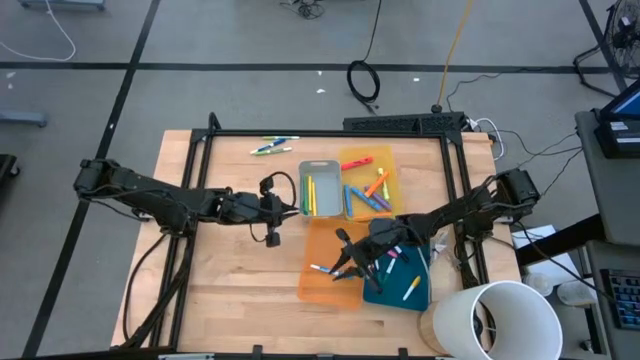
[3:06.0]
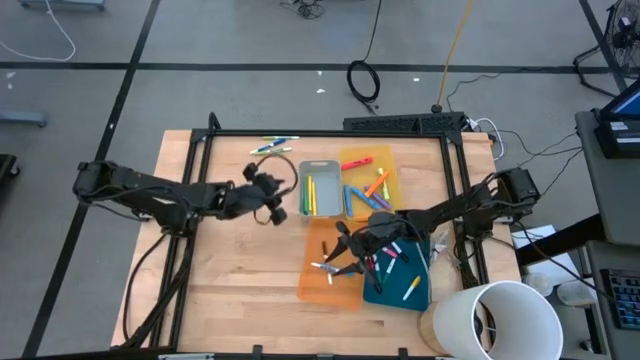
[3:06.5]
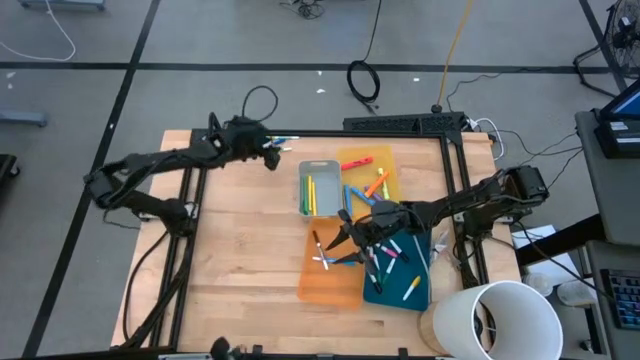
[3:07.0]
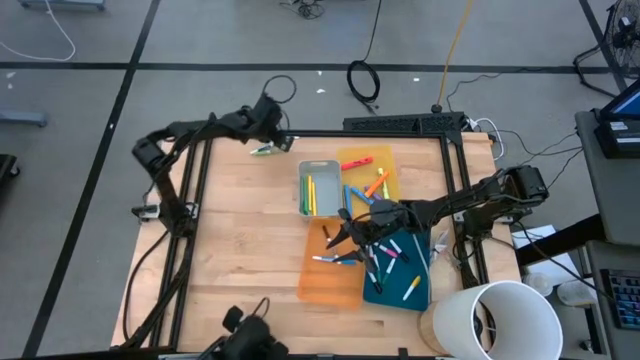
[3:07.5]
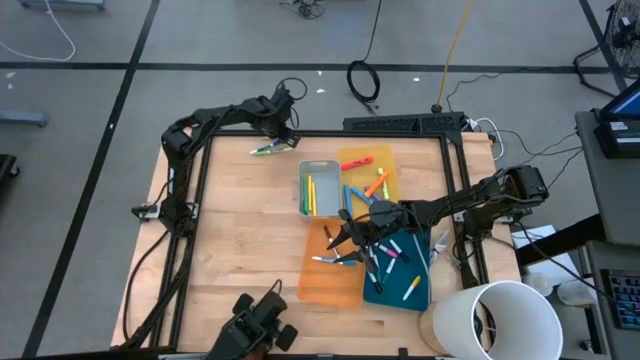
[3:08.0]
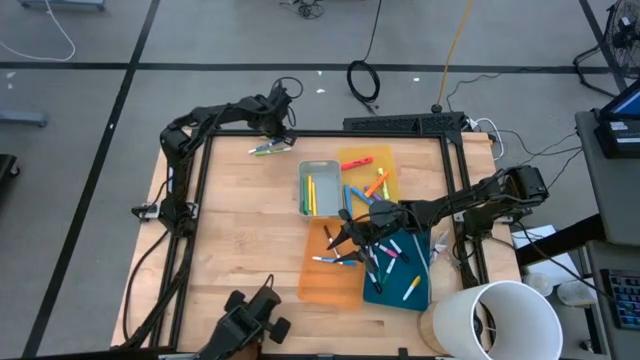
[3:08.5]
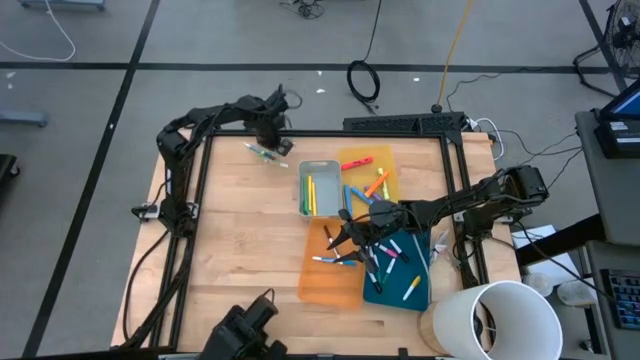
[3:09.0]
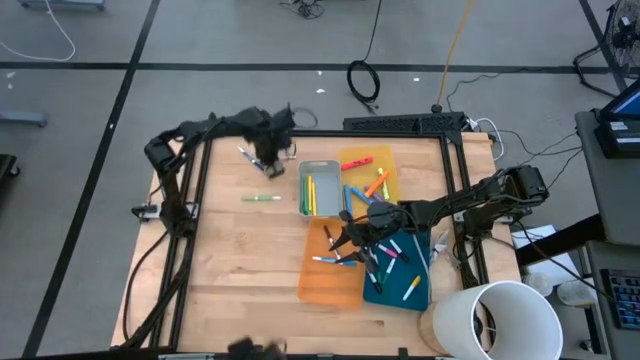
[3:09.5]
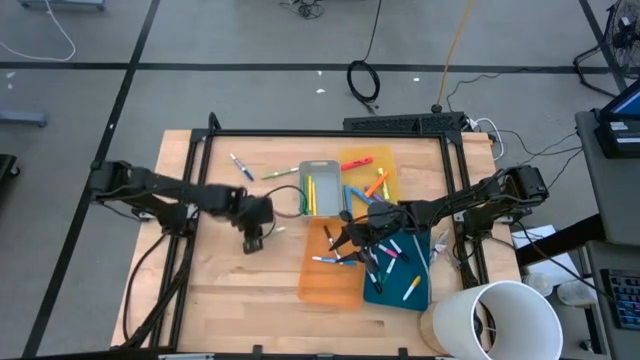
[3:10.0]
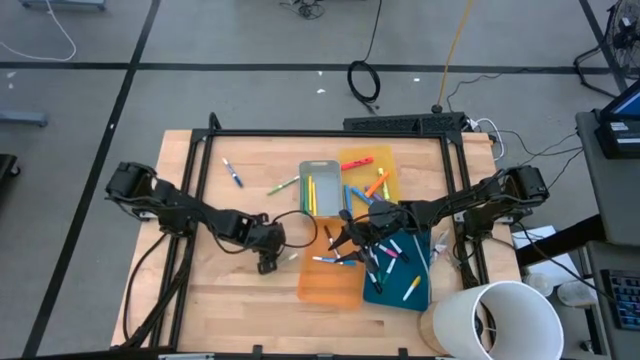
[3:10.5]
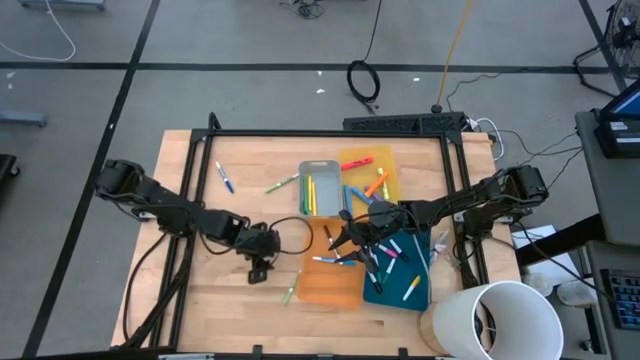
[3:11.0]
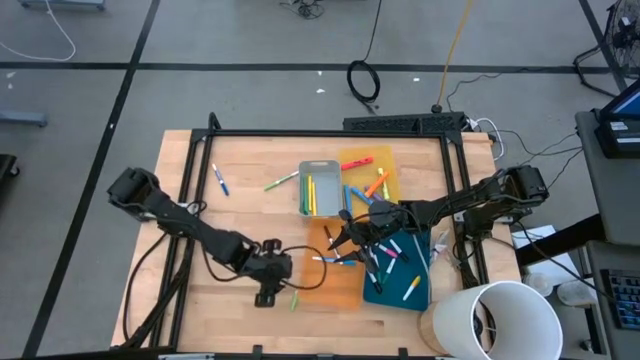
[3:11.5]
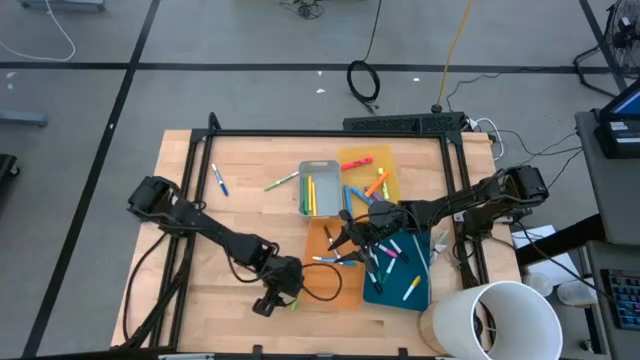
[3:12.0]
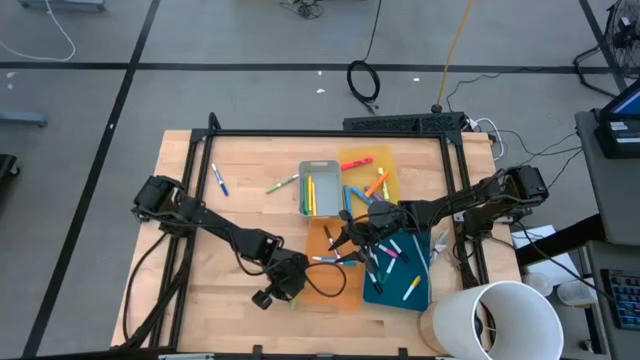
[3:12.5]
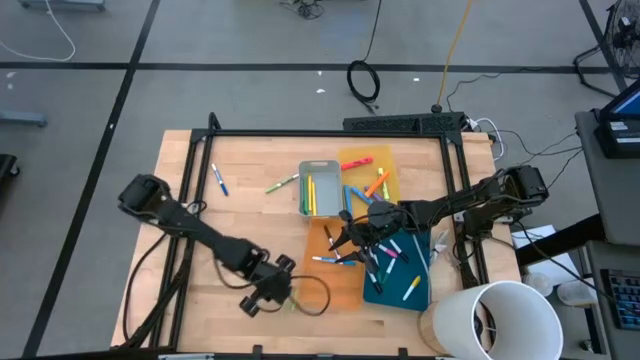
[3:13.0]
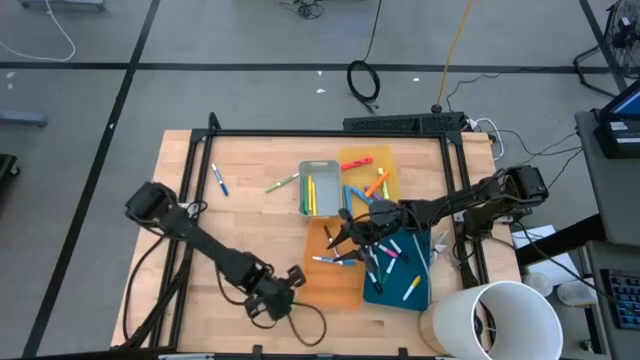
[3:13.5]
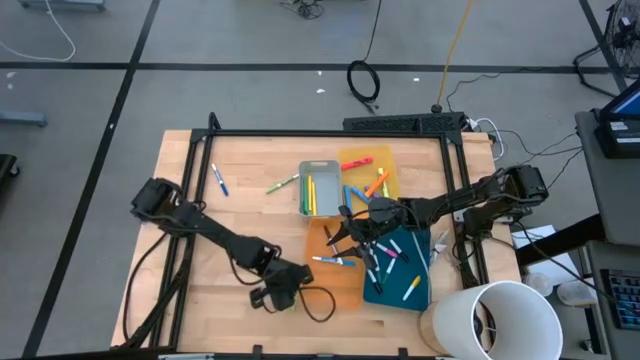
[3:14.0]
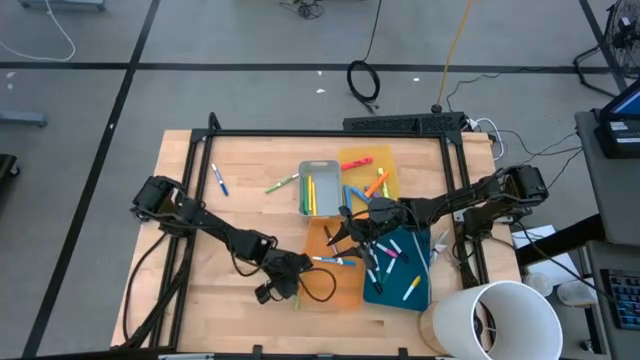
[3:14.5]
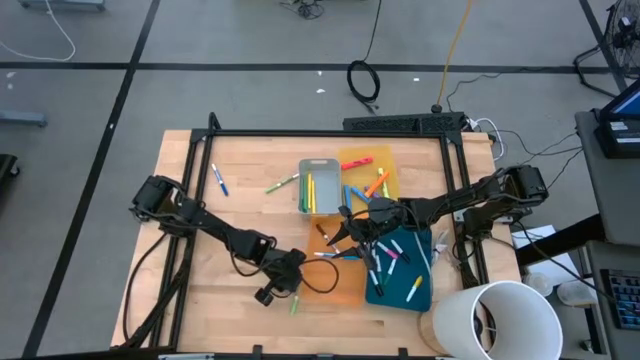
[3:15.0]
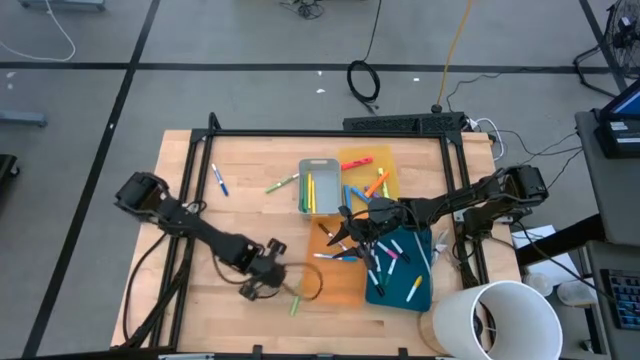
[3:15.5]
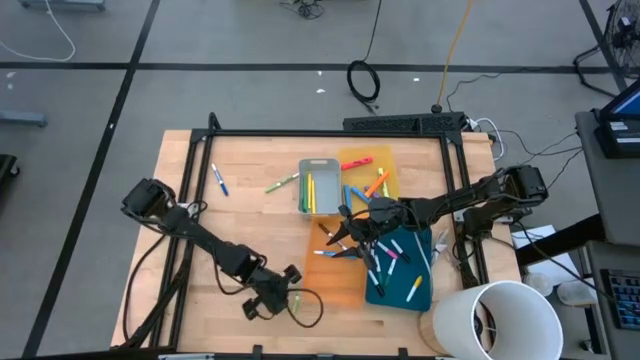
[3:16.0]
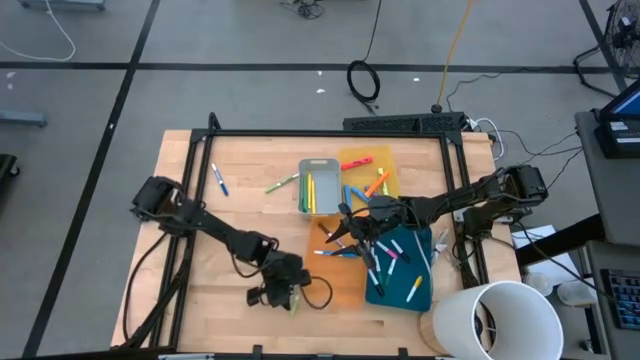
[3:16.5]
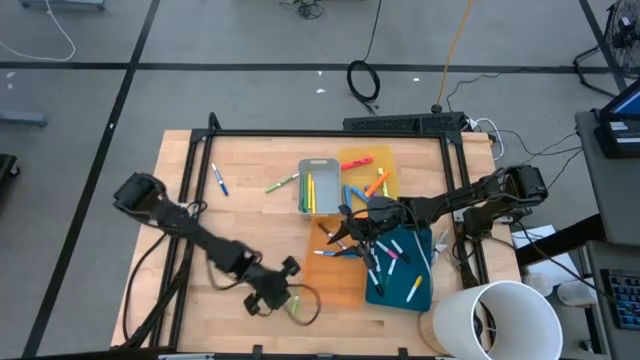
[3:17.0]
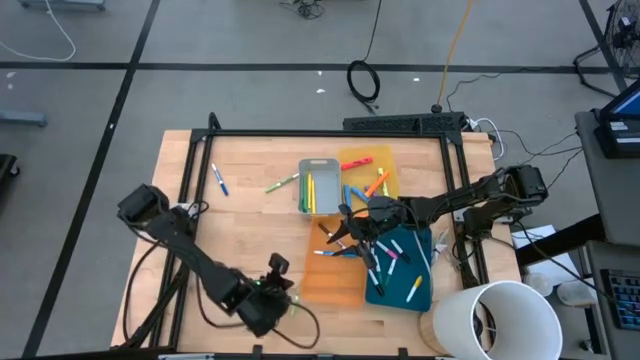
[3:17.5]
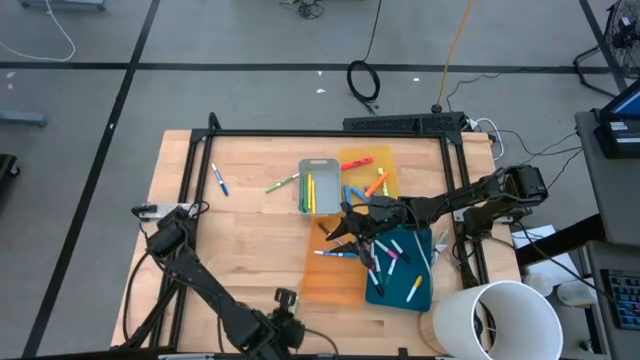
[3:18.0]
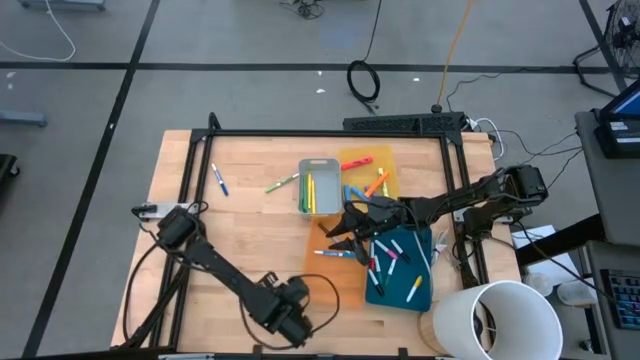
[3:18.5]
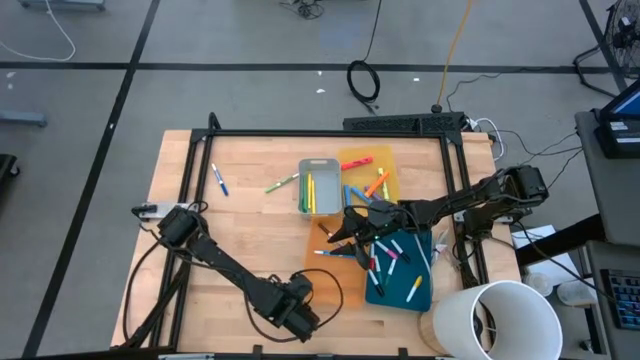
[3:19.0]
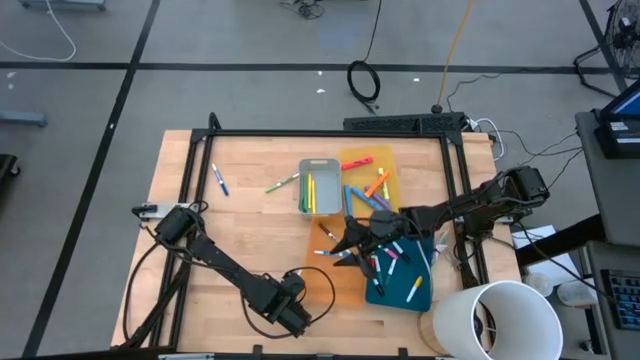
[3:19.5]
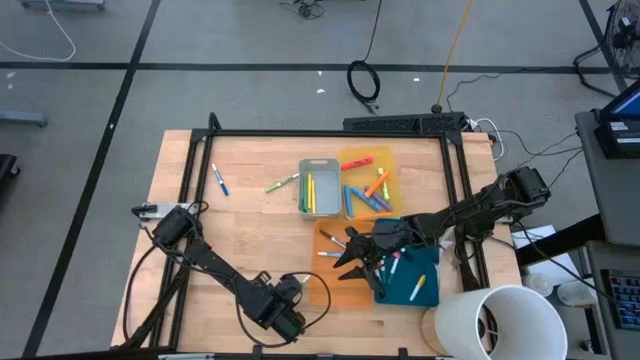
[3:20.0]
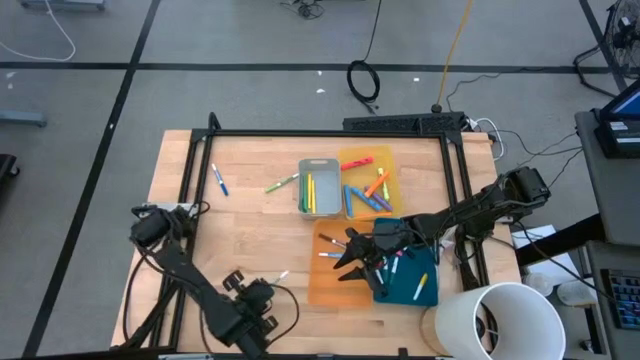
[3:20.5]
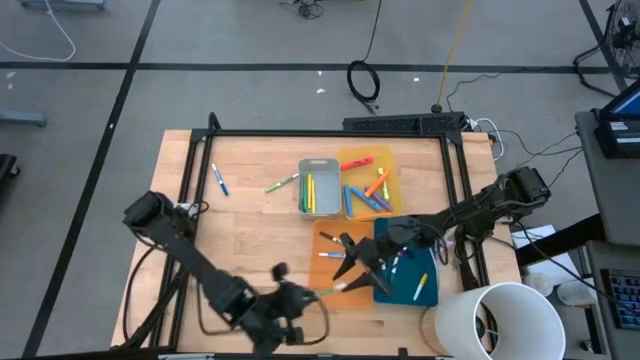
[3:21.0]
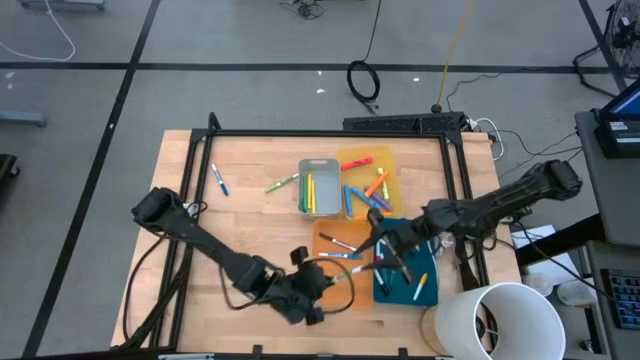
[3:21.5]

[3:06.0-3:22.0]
Task: Pick & Place Markers
Put the green marker pen into the orange bin

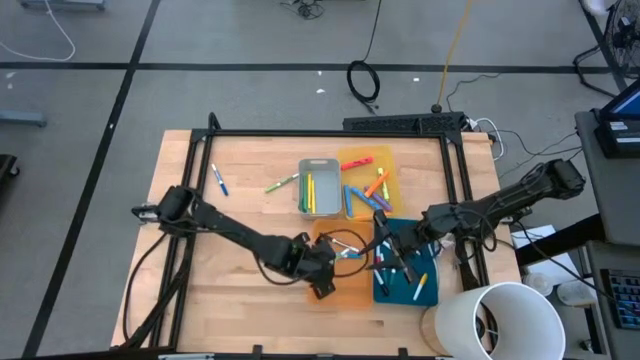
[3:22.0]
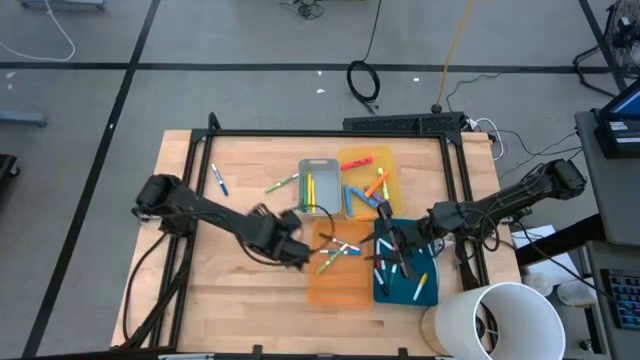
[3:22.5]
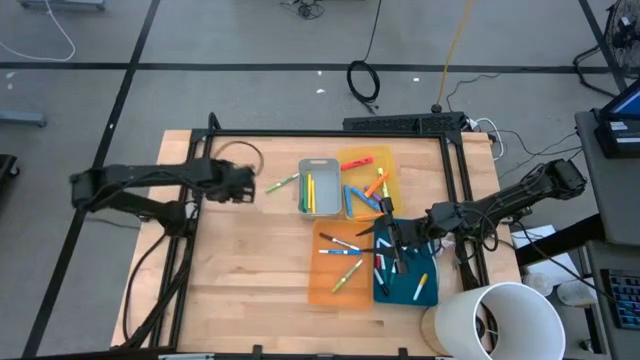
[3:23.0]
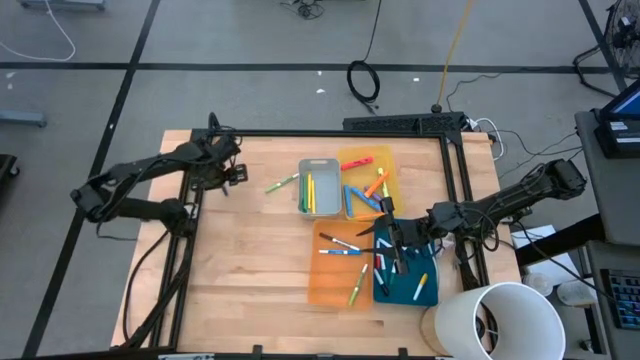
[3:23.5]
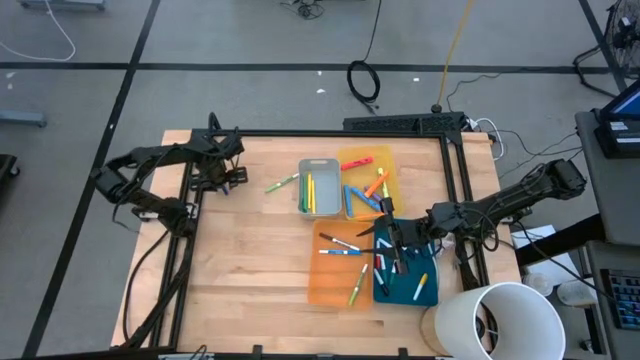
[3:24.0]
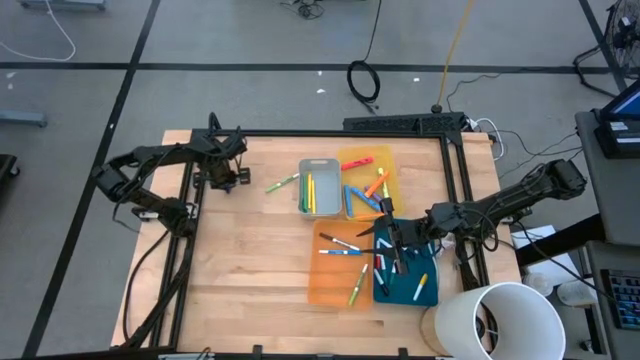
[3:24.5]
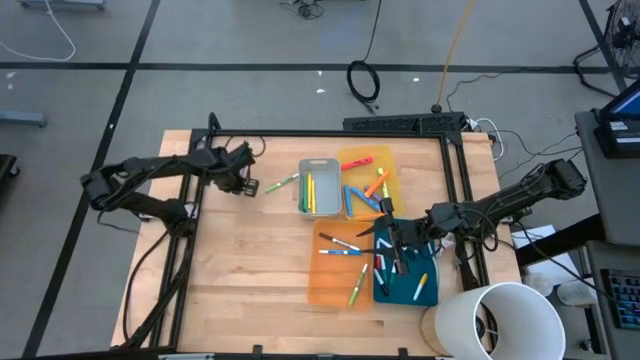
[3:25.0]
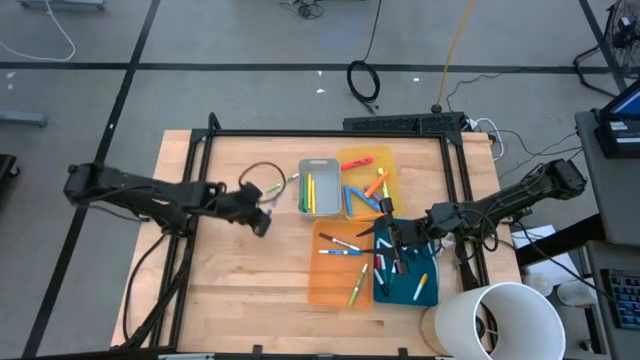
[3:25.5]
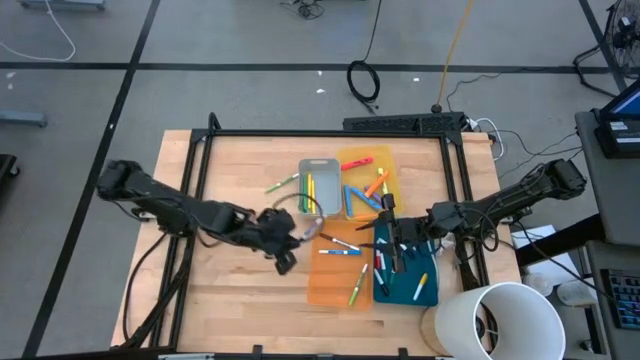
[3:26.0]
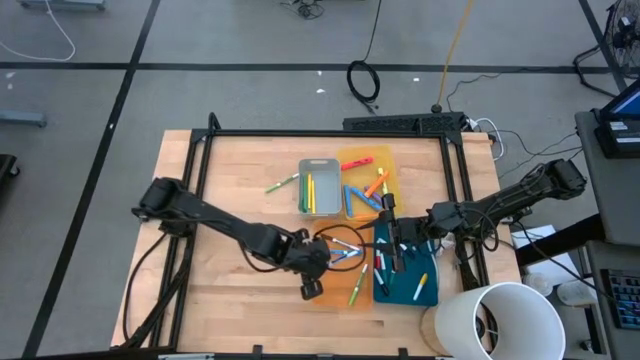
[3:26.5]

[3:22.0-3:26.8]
Put the blue marker pen into the orange bin
